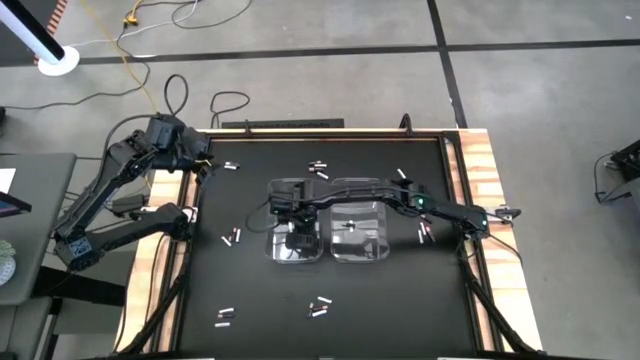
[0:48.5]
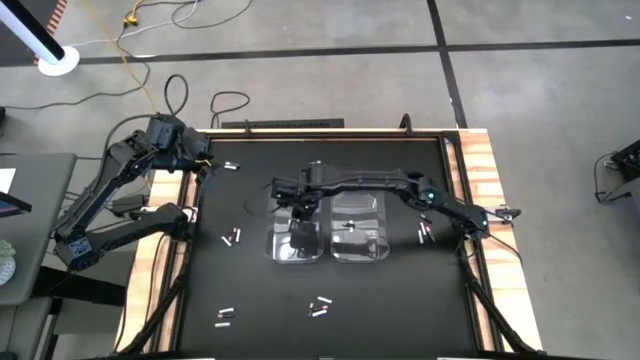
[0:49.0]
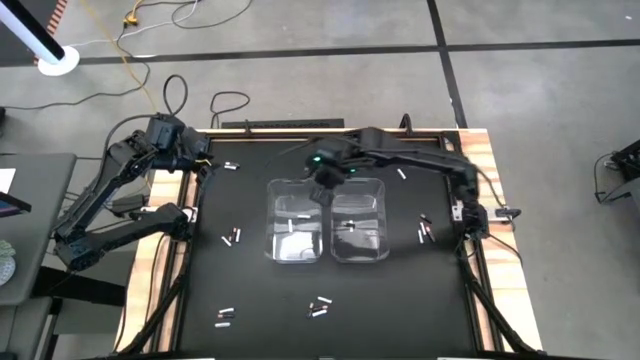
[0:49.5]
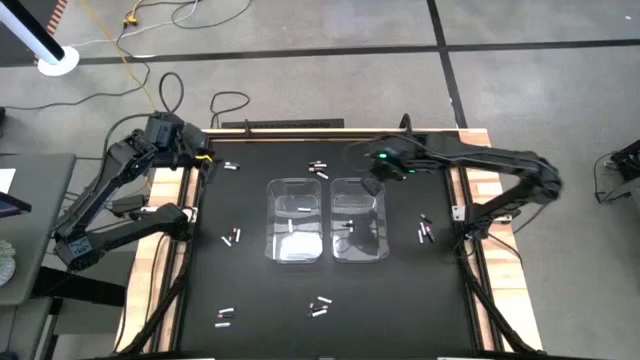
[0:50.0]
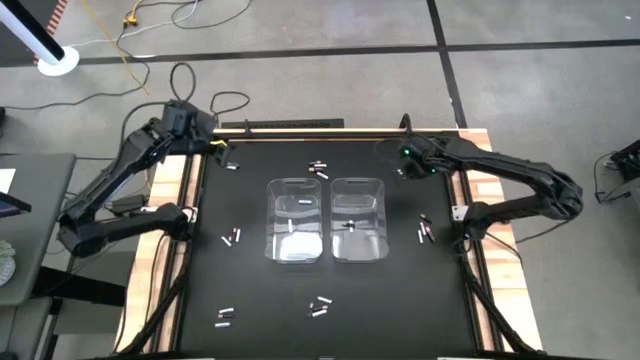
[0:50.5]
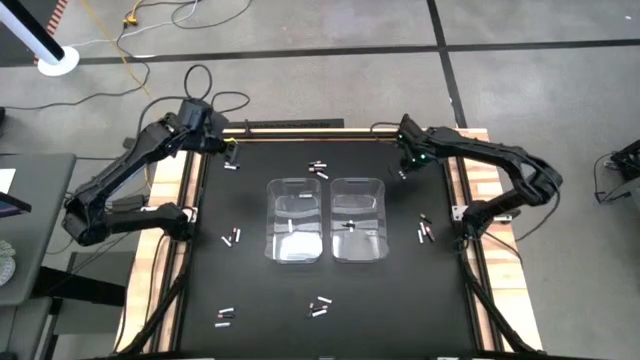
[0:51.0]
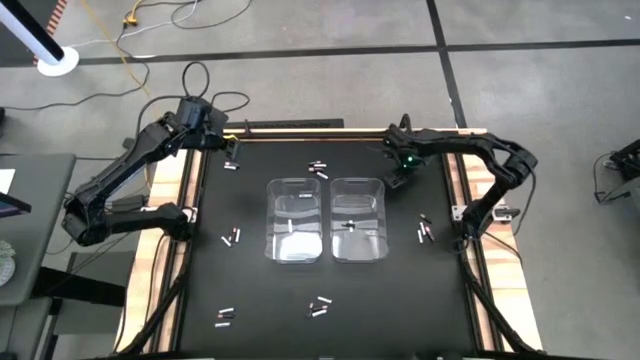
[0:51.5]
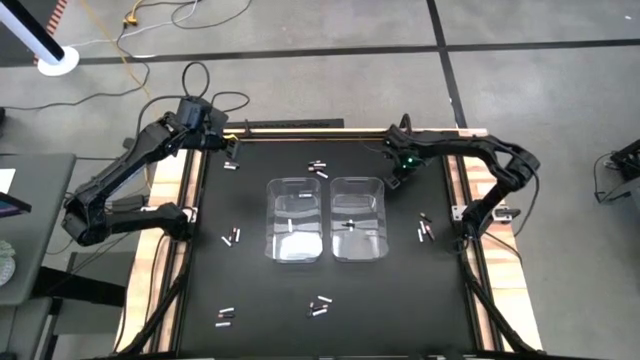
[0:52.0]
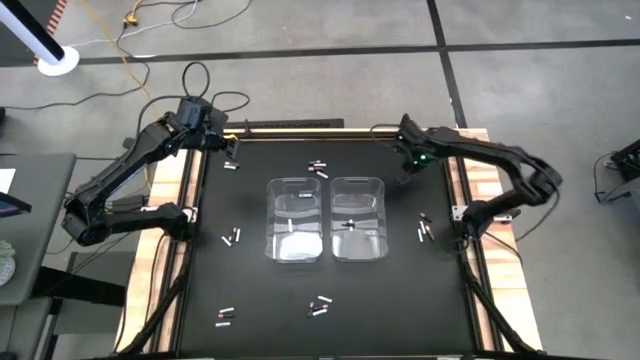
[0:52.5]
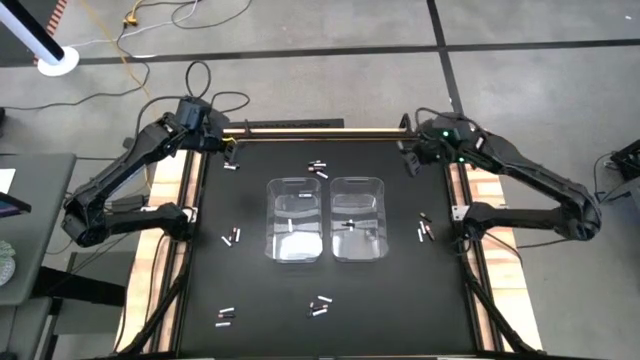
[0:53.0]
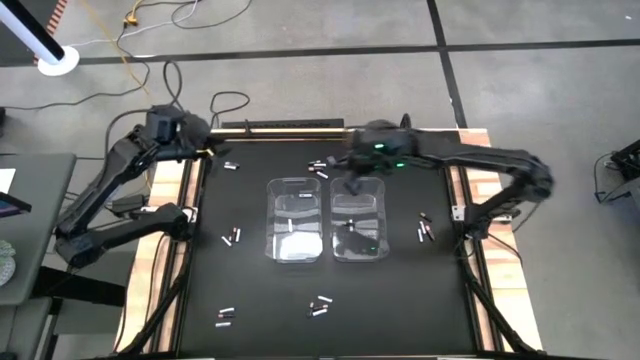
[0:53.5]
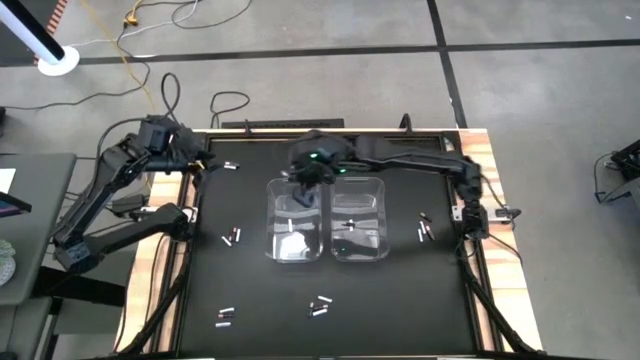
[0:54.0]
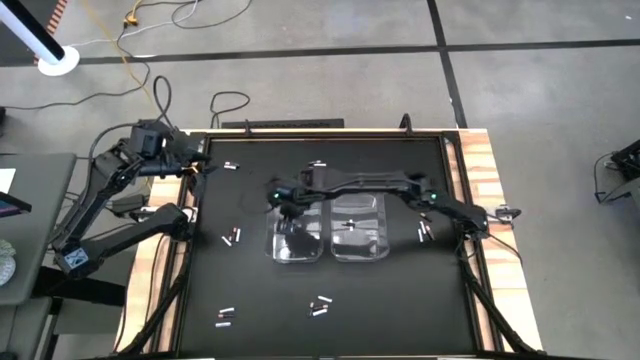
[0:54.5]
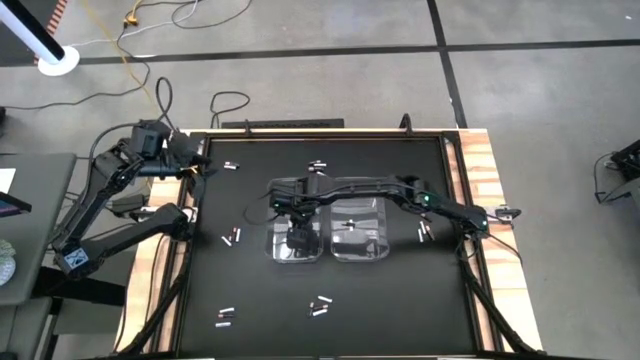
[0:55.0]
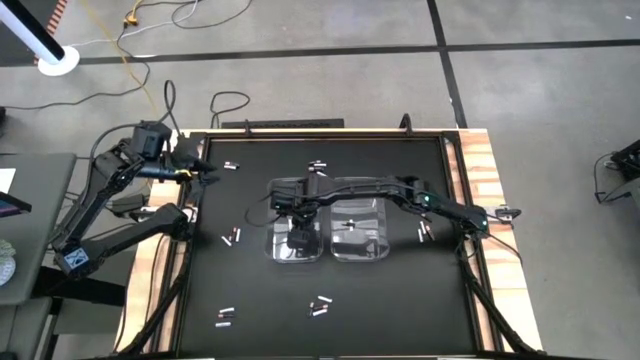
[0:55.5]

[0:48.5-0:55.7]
Task: Sort batteries
Put the white battery into the left transparent bin

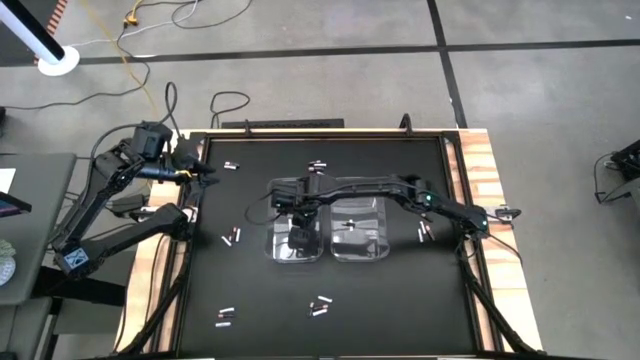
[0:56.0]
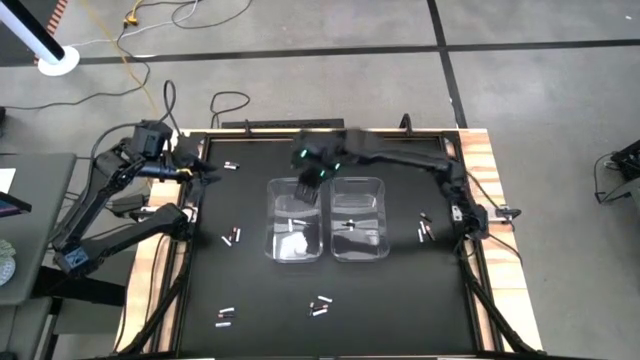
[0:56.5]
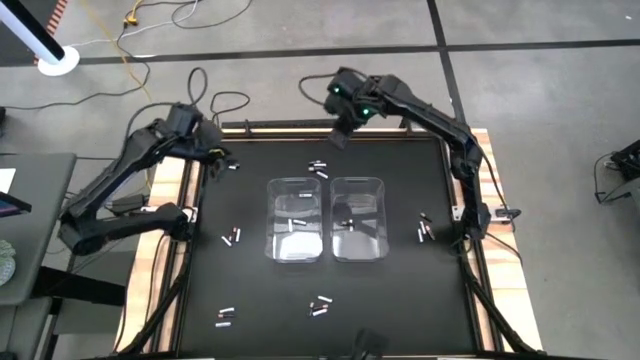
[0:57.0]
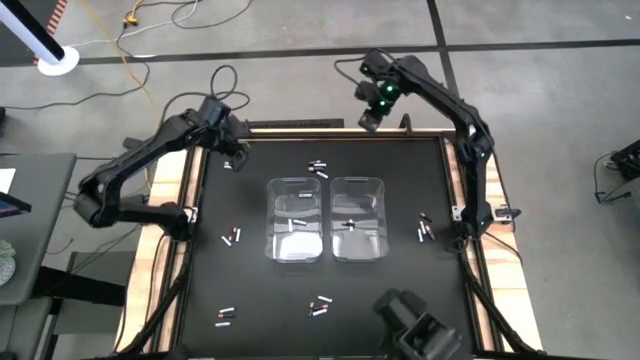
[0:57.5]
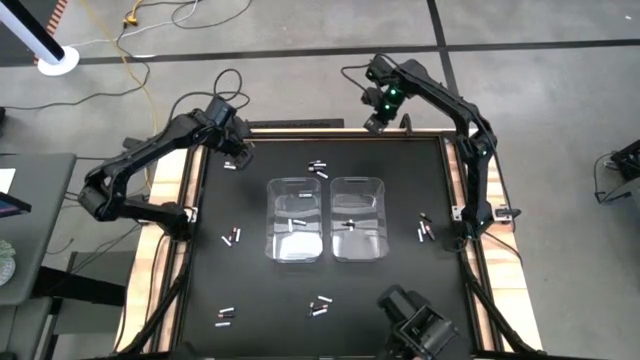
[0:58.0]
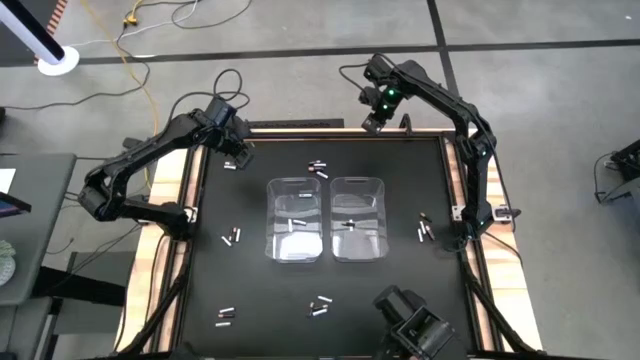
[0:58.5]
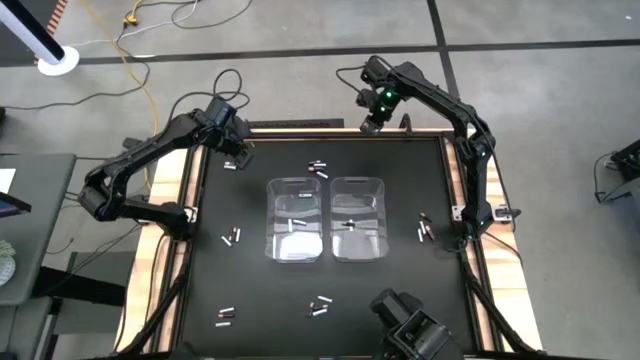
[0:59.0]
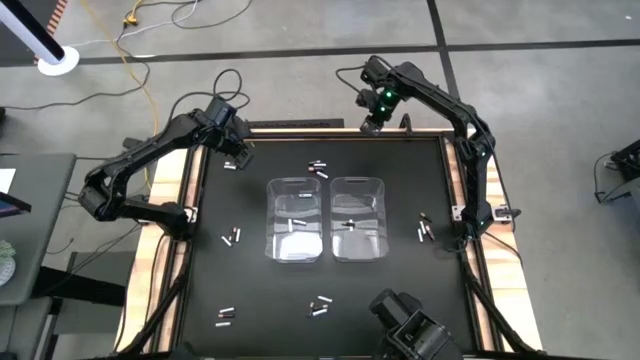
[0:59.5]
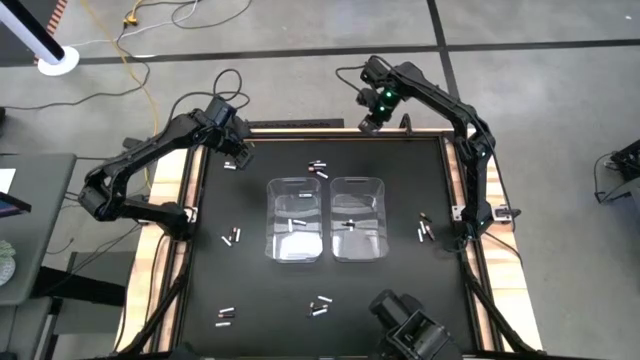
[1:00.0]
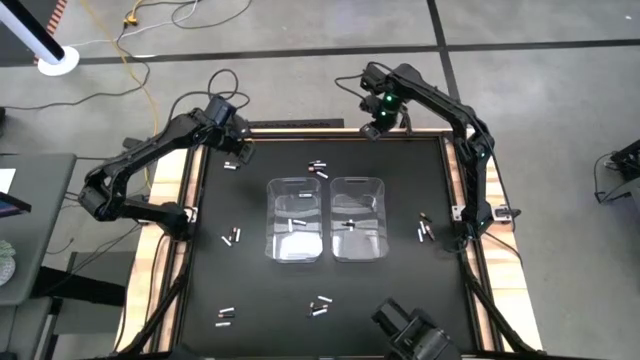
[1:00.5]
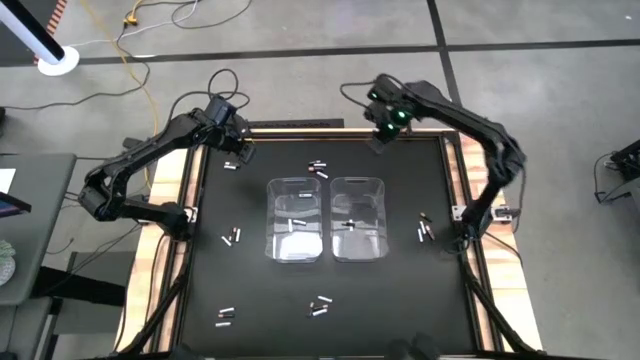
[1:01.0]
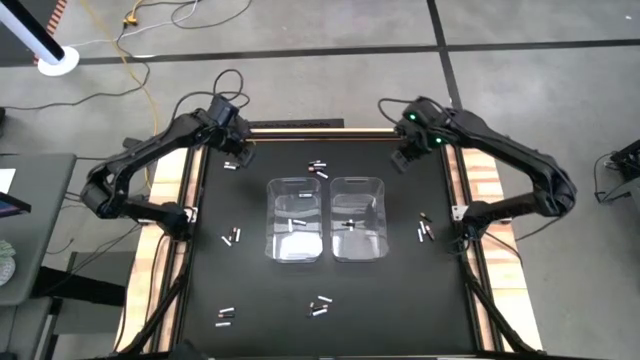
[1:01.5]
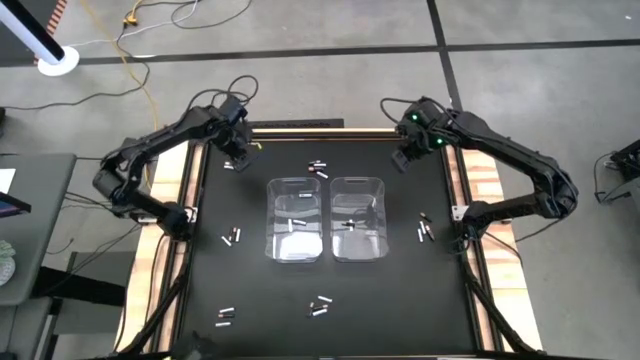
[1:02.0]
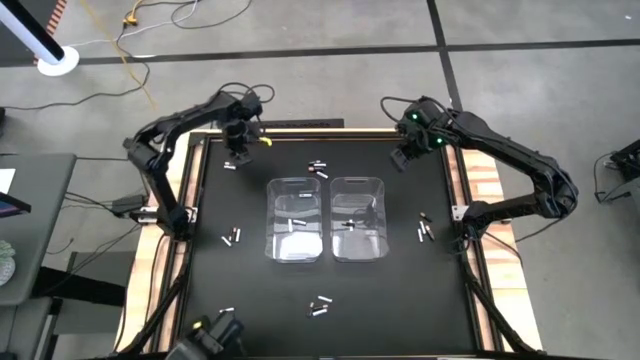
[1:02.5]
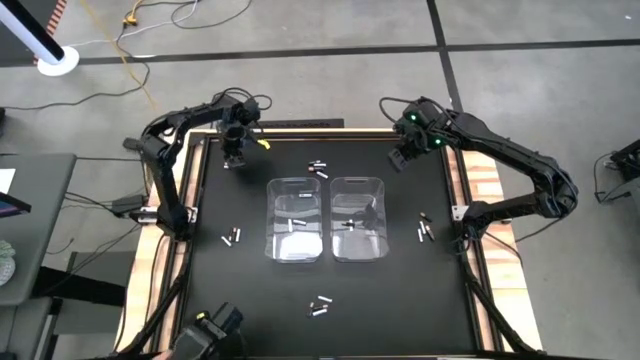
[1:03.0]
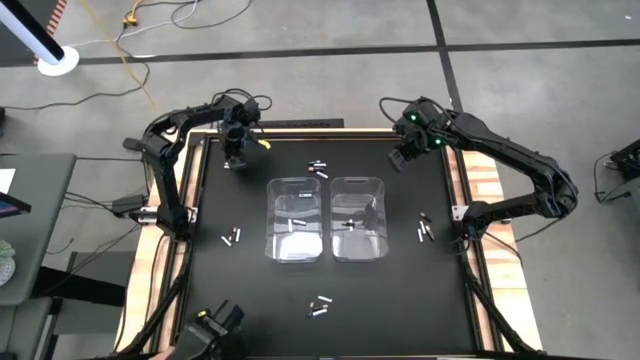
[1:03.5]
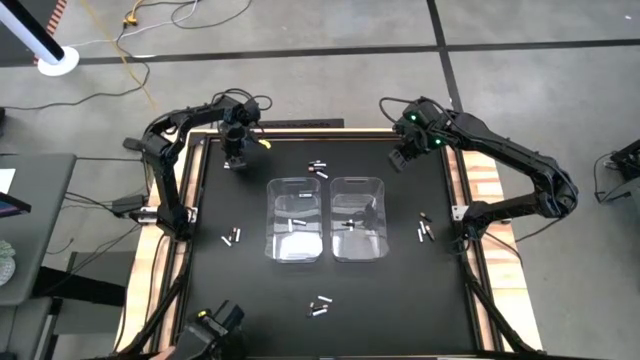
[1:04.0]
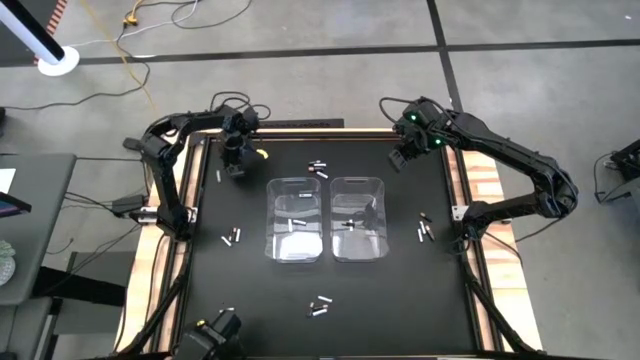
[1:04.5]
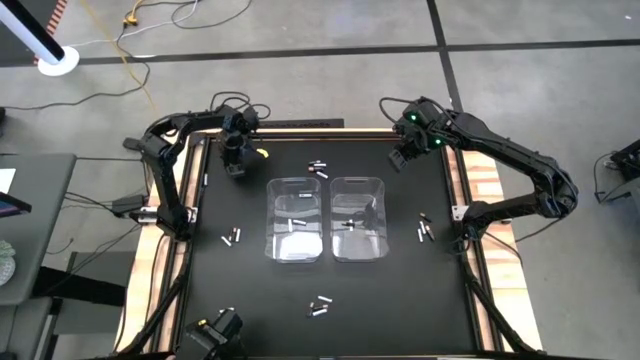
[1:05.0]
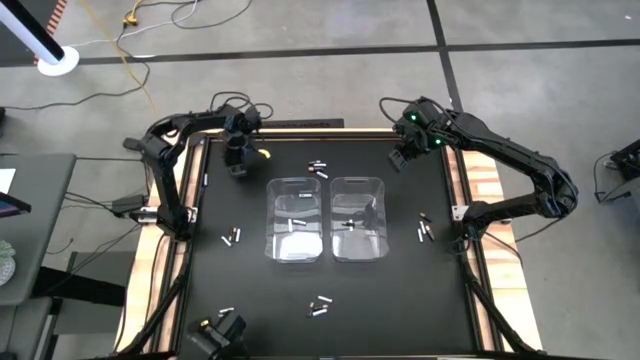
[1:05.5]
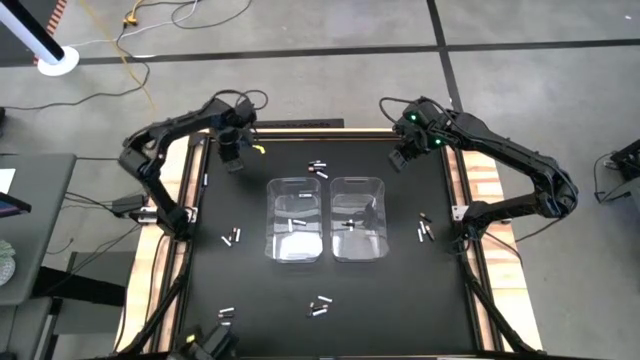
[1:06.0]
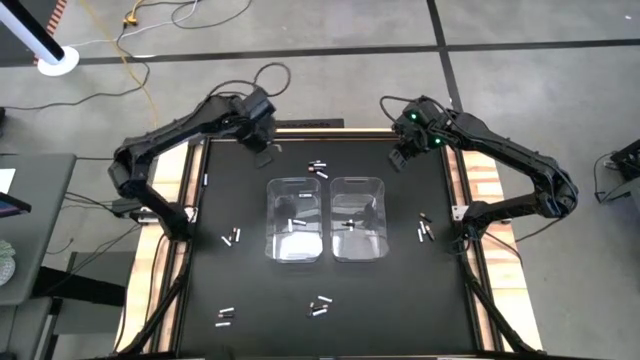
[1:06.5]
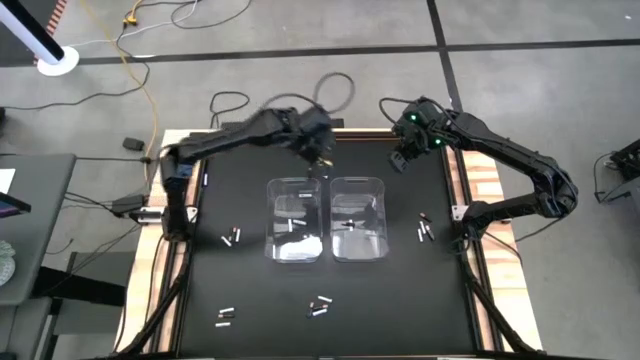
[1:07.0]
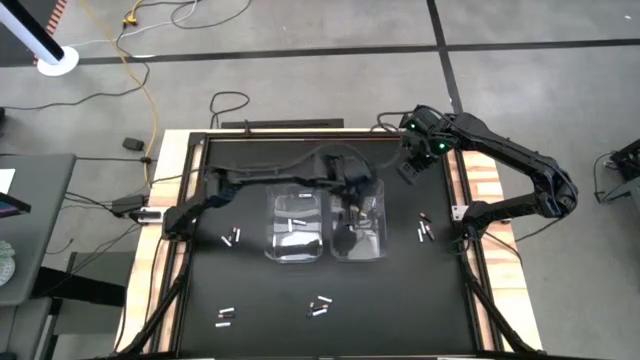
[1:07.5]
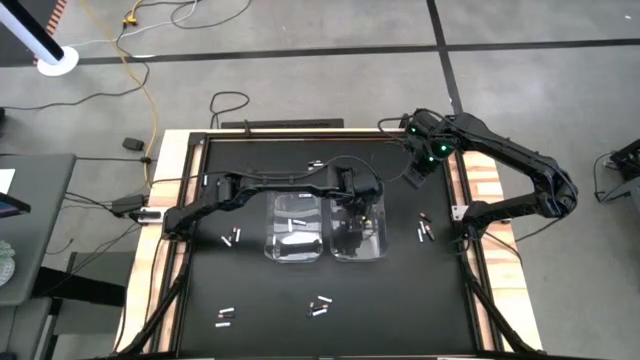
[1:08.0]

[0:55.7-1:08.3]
Put the black battery into the right transparent bin
